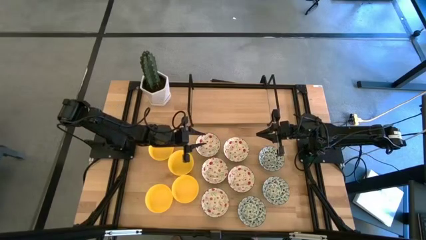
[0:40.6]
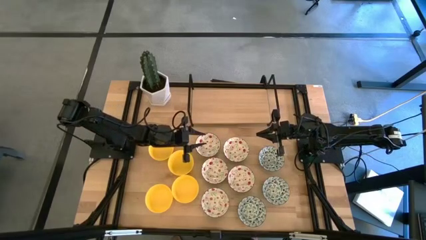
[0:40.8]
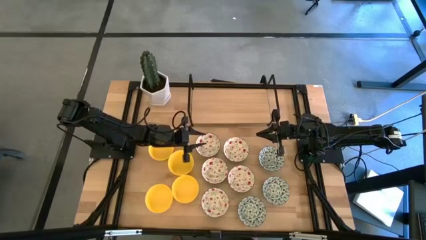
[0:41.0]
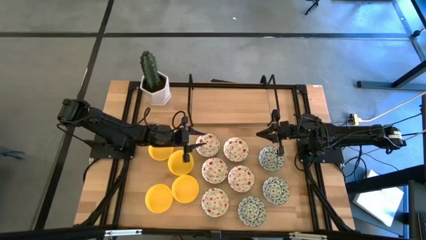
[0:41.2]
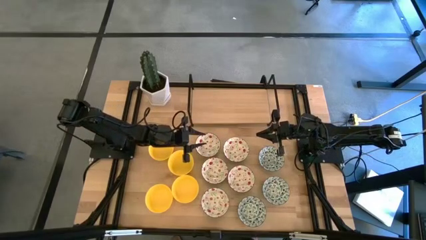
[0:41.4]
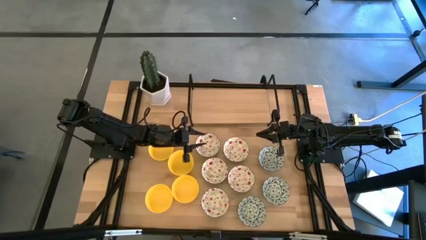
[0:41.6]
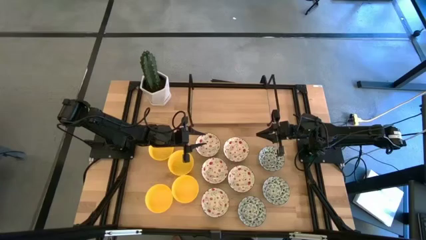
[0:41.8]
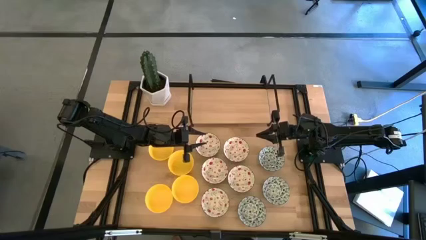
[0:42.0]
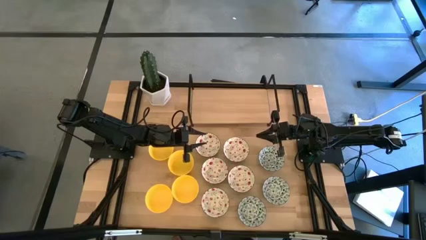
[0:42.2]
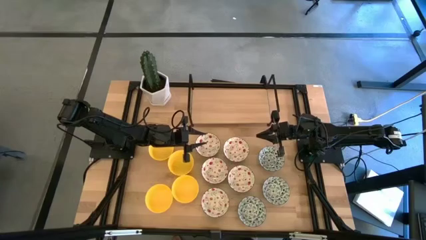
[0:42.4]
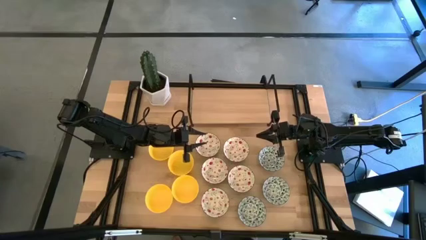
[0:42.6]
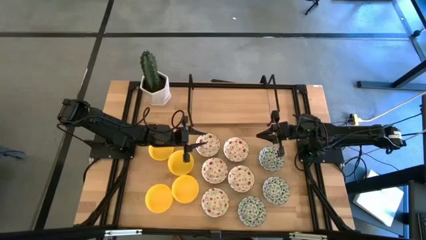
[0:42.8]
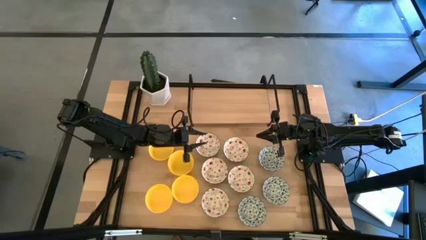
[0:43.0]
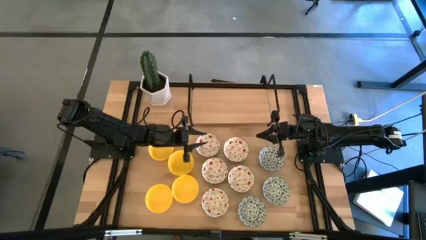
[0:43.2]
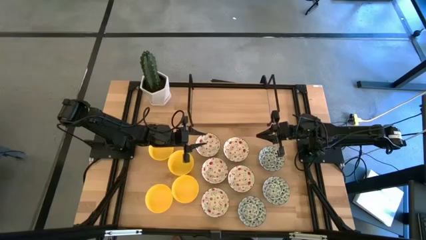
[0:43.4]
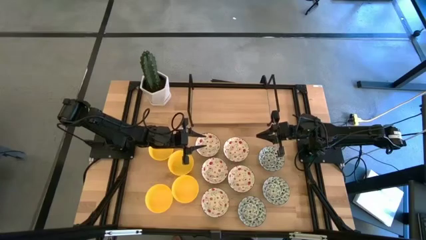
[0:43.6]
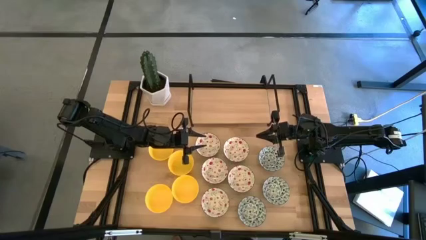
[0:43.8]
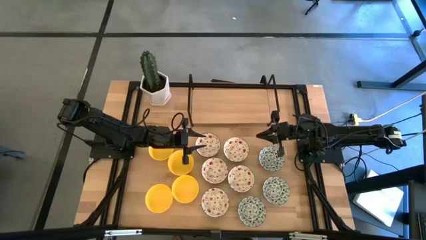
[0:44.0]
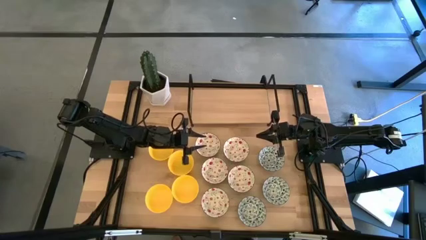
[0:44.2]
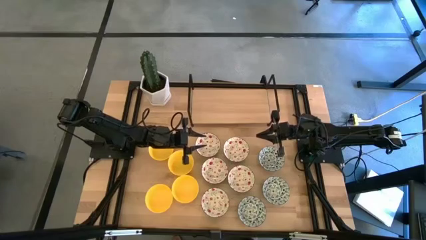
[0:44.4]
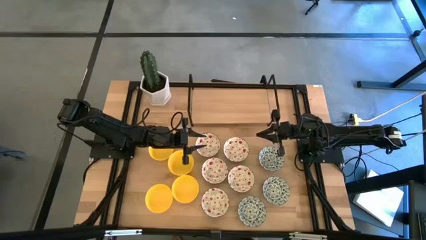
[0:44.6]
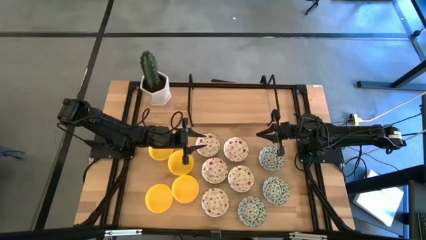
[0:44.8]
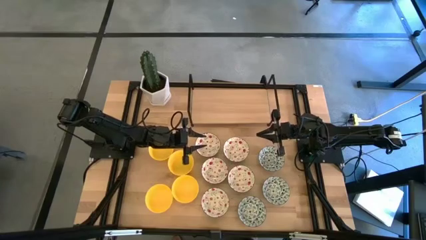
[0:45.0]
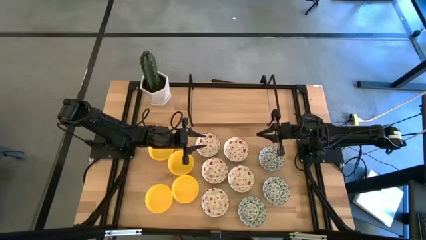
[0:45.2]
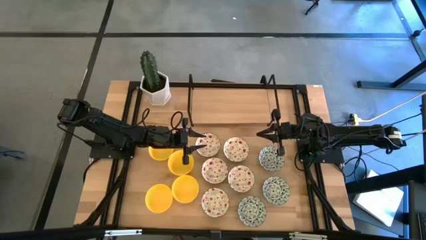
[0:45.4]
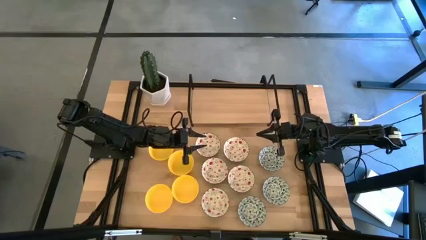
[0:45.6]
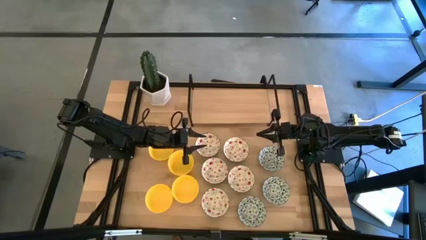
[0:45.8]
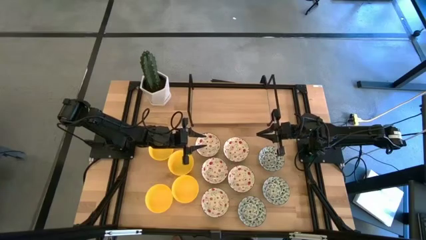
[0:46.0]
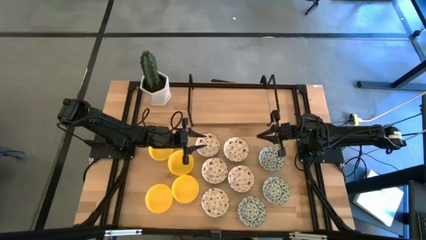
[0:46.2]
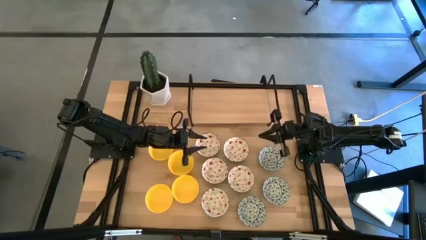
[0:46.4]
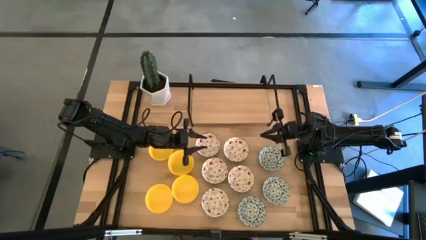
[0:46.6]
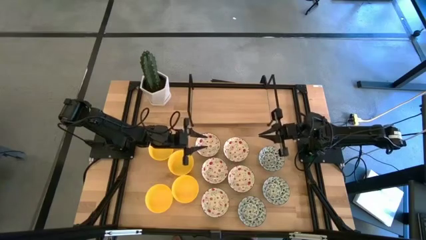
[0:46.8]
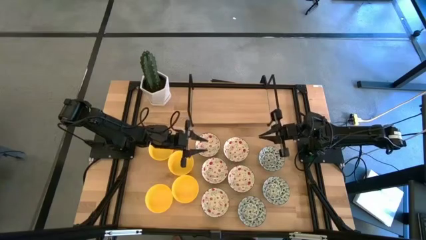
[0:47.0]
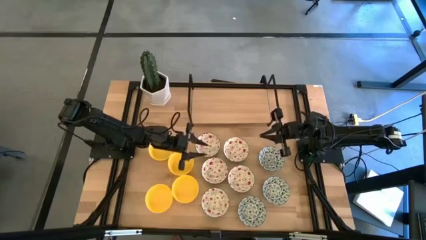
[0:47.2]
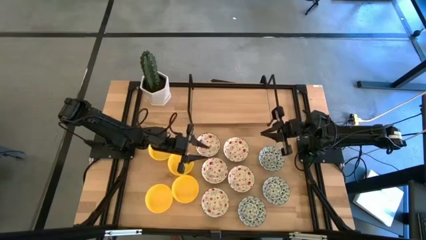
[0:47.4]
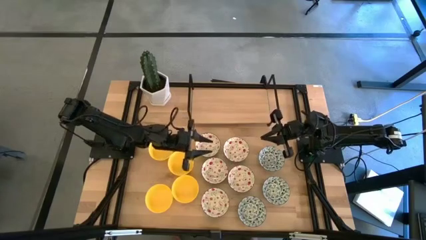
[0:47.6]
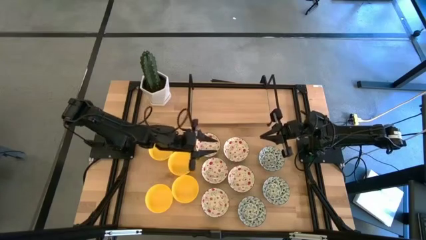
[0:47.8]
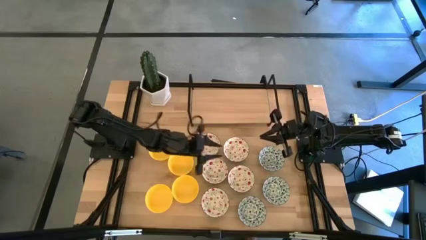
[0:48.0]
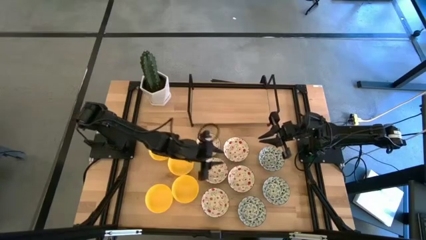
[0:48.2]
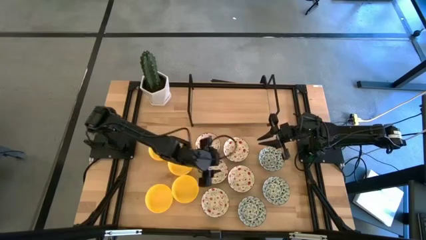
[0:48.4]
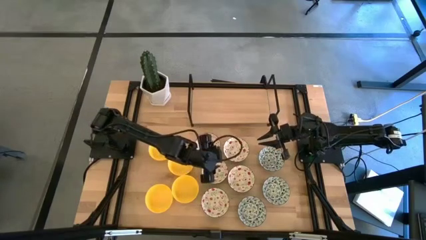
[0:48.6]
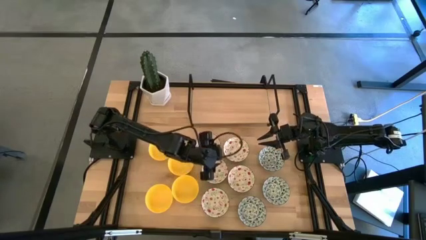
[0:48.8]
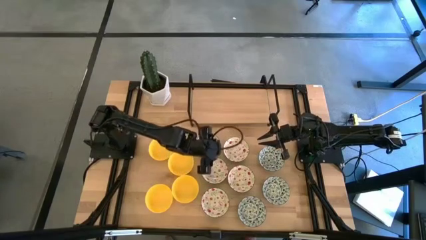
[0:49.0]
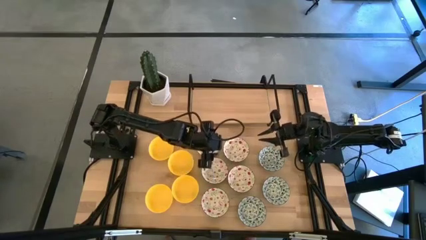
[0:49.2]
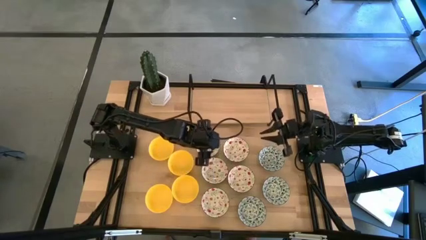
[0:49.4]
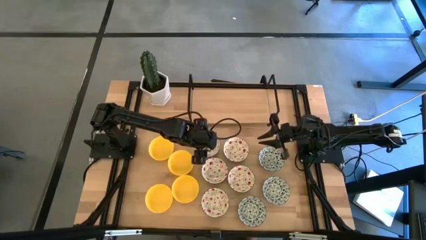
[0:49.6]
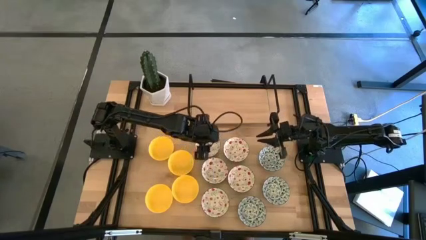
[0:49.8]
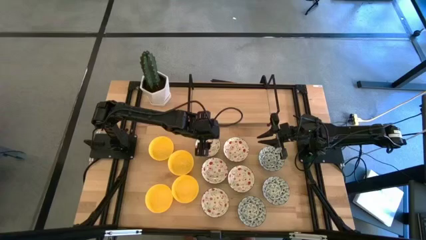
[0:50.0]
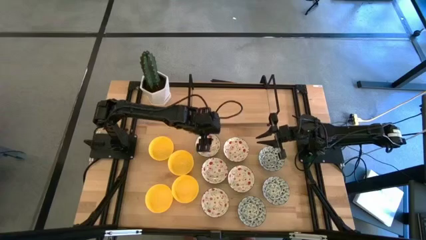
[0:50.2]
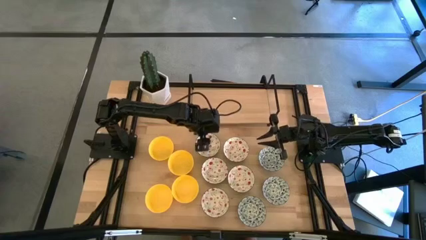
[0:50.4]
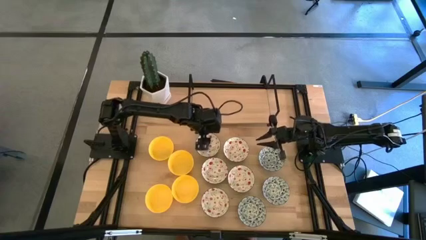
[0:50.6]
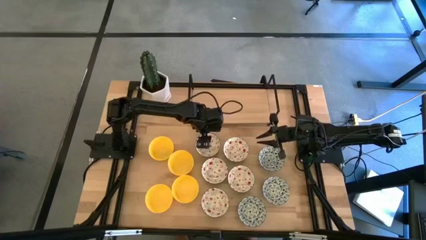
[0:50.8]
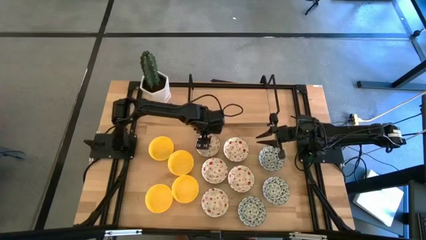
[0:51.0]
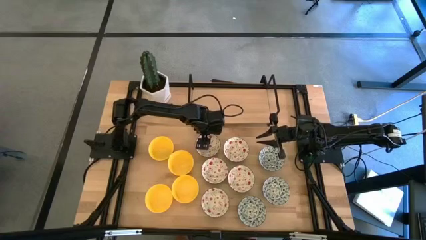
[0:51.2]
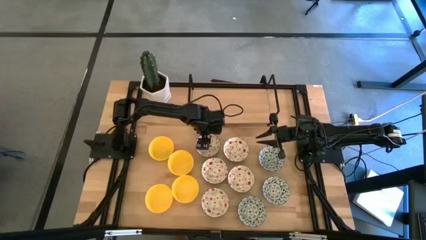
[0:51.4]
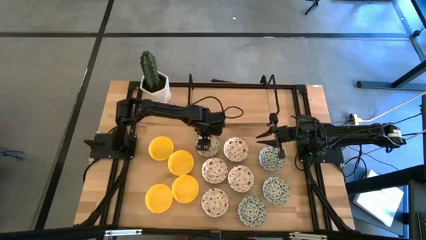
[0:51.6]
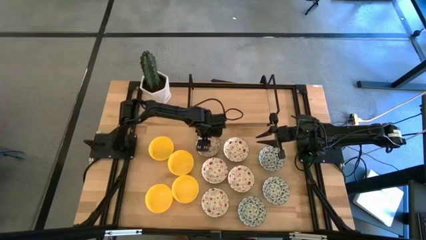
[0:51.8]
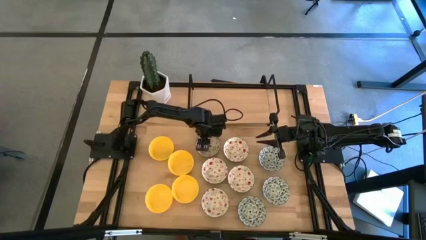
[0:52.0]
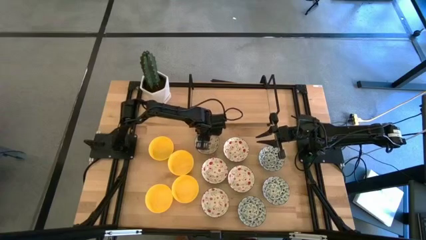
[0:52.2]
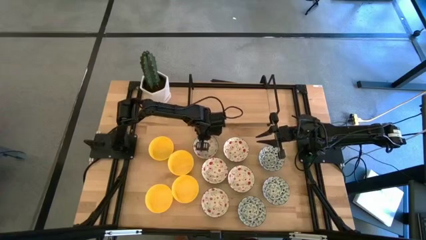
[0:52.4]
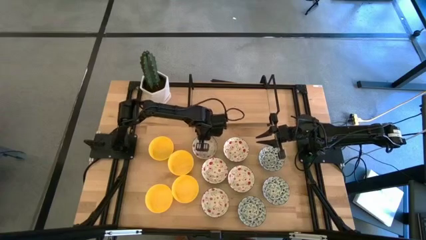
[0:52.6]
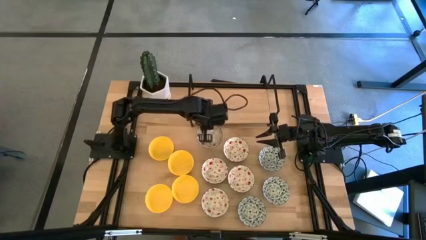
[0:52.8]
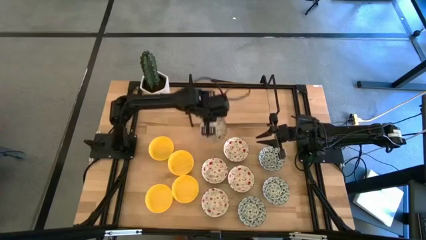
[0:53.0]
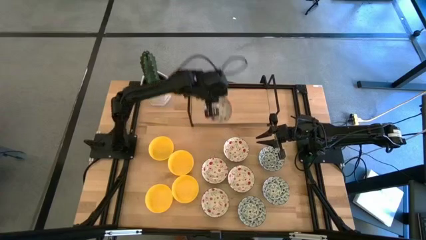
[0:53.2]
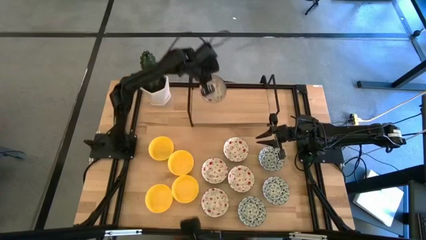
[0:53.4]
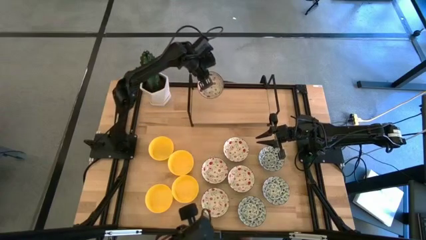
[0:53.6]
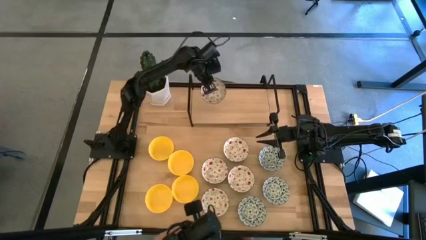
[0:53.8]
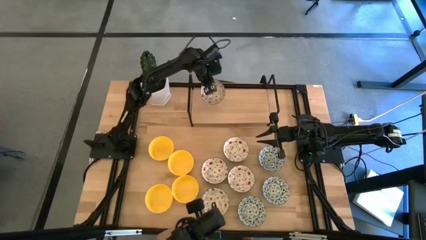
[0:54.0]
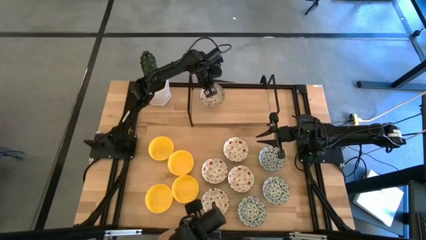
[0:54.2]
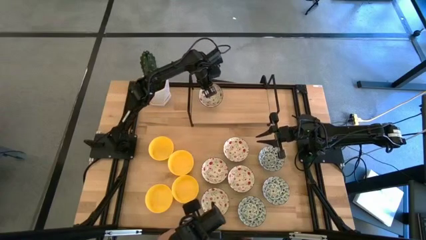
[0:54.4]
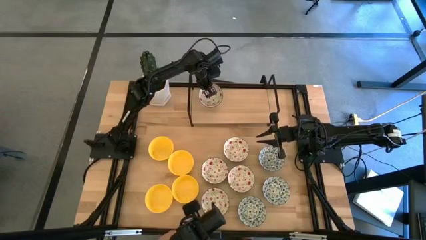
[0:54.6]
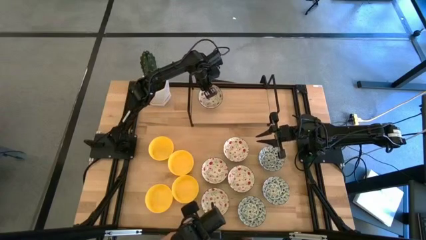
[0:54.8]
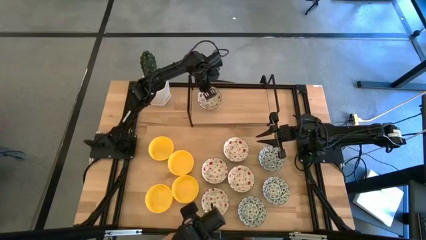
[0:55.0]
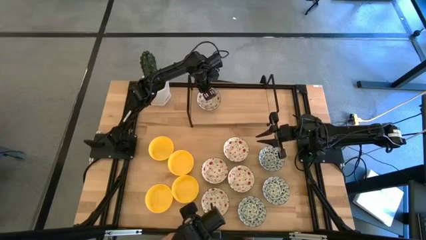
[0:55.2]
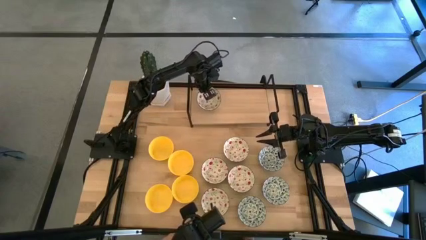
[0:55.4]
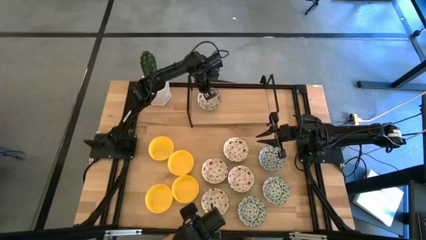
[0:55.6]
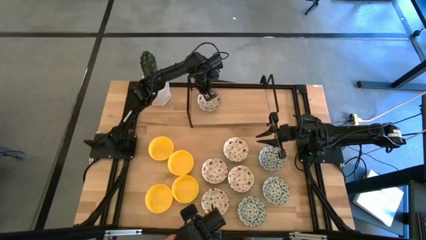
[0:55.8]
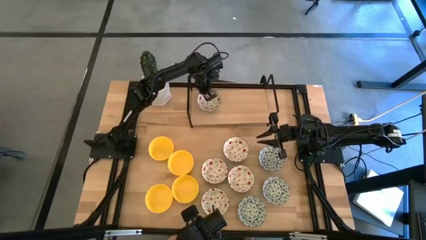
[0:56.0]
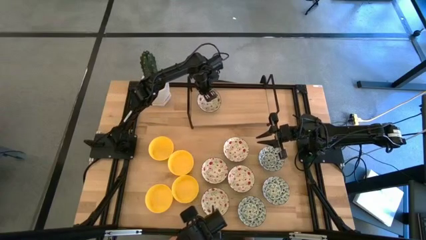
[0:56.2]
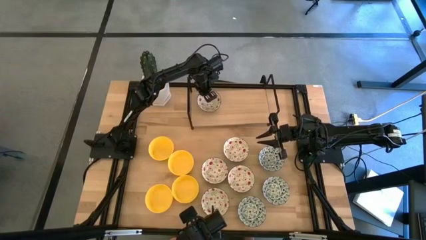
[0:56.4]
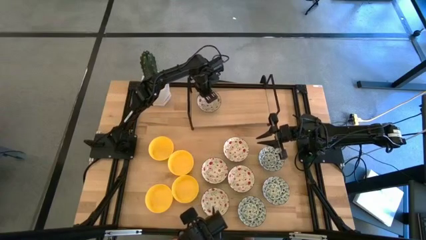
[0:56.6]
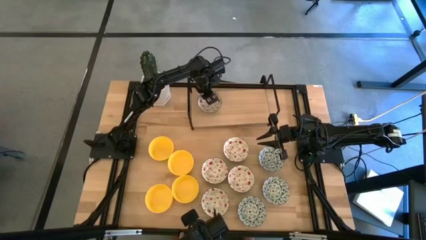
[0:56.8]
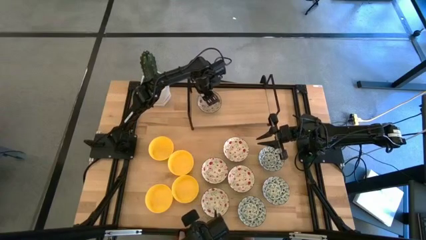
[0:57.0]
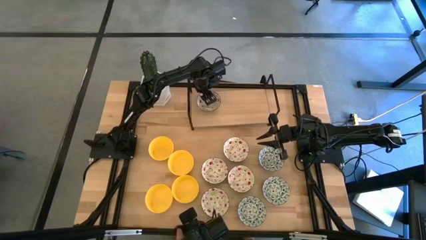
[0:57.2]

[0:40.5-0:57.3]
Task: Pick & Place Mini bowls
Put the red patterned bowl on the shelf
